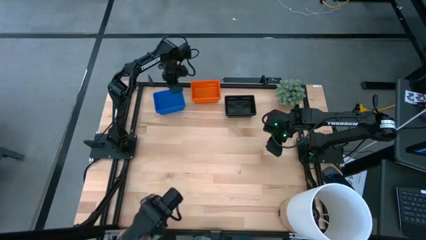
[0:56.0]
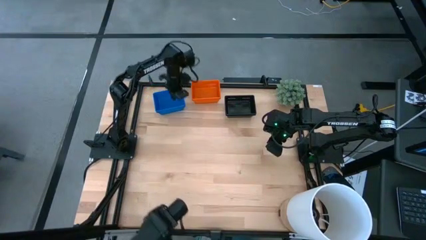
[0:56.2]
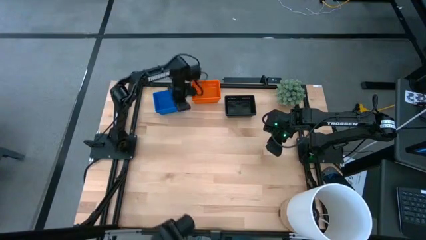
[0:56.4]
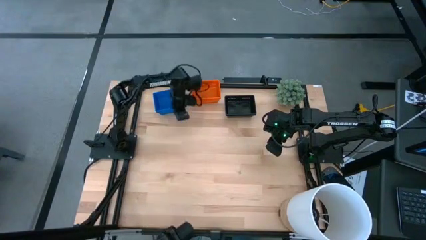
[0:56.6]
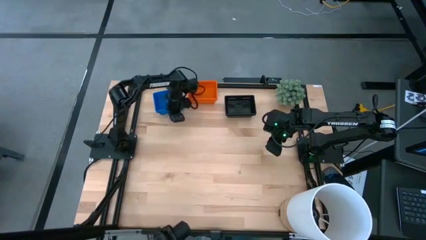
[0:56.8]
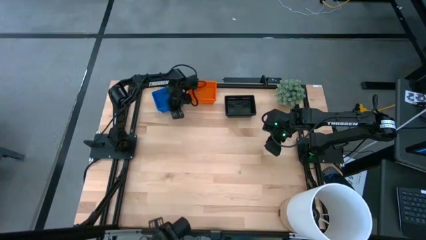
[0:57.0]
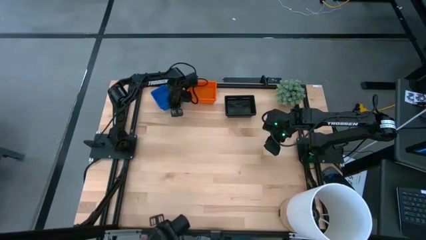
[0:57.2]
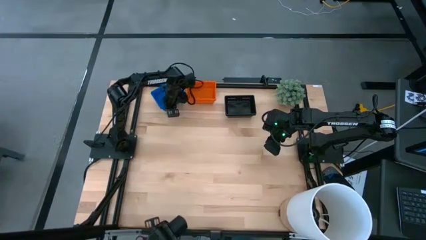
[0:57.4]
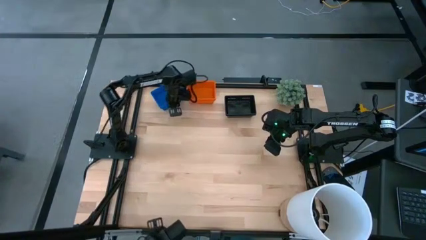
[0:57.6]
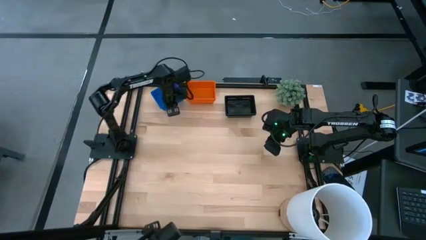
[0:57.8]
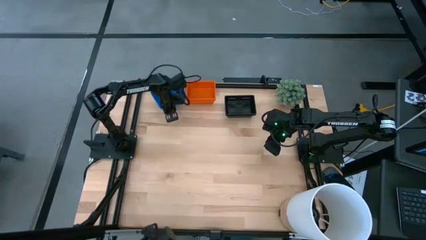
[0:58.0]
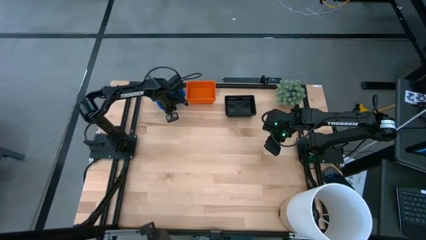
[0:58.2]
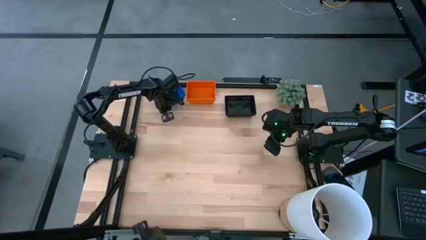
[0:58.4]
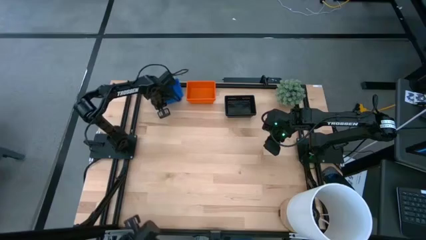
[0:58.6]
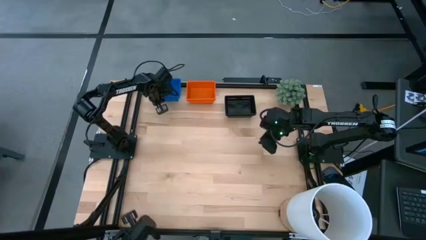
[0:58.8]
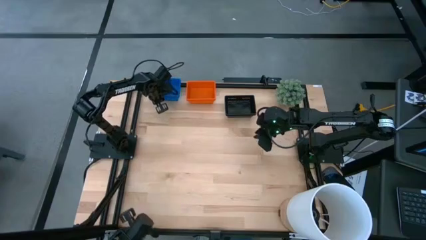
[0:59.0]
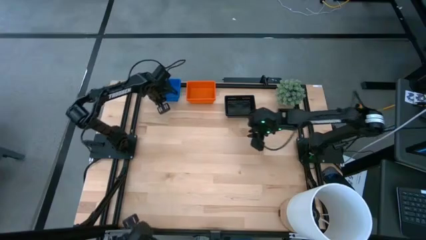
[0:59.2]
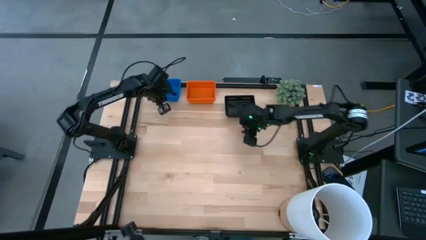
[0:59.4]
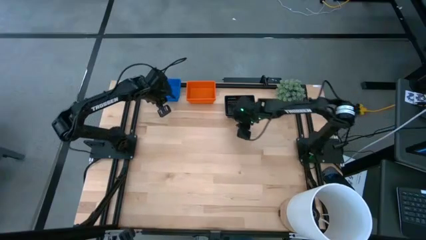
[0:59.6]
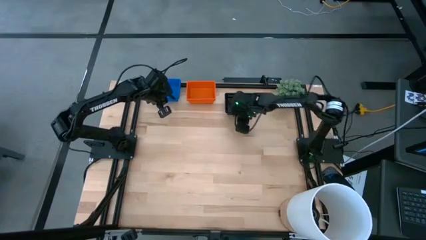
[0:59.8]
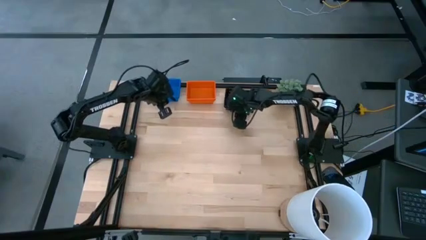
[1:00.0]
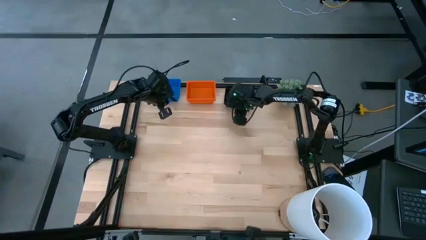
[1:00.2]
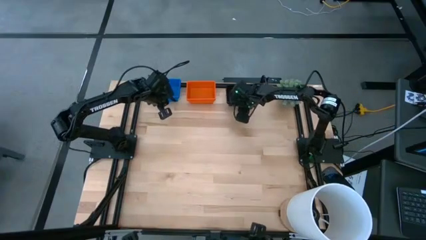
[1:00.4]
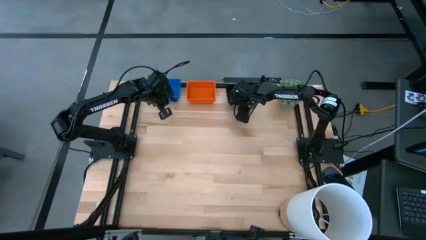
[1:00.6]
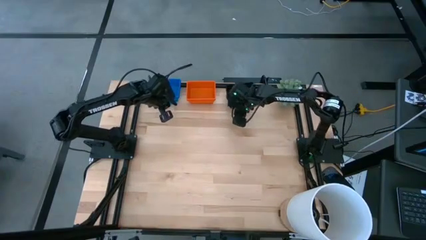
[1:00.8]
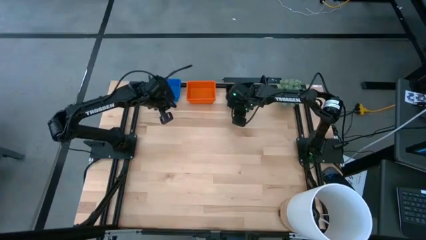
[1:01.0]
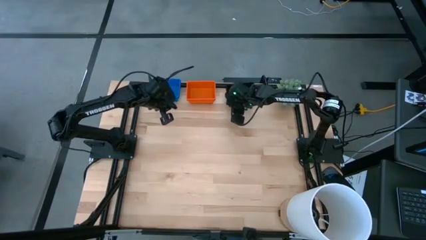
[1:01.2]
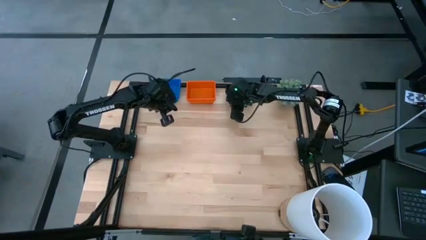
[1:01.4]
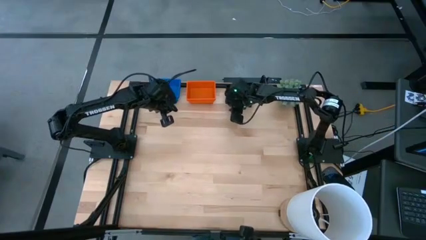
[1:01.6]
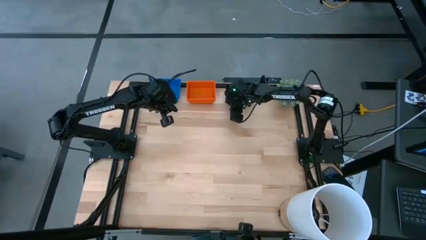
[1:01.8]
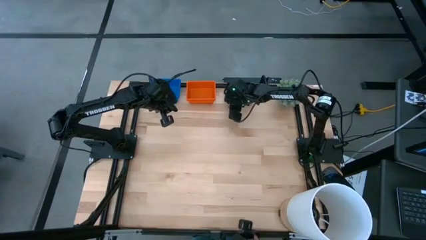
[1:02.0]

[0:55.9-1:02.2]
Adjust the stack of bins

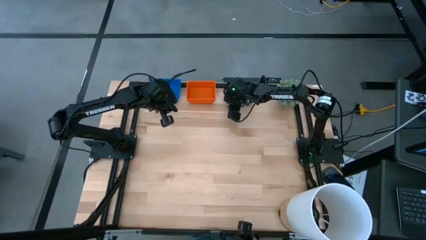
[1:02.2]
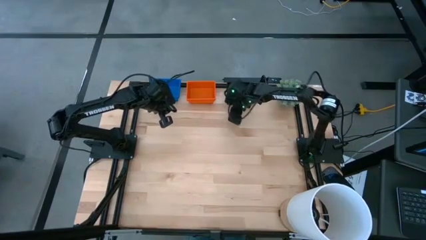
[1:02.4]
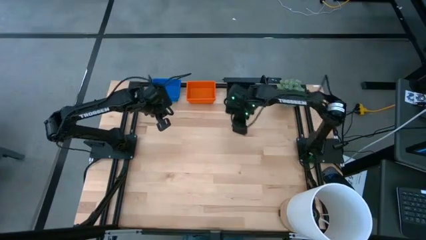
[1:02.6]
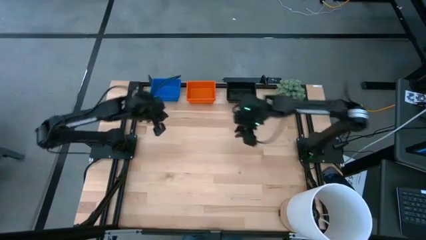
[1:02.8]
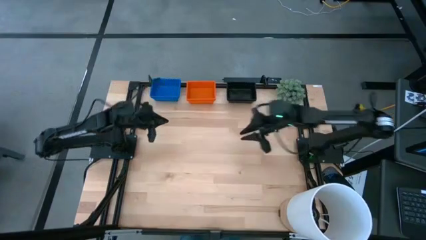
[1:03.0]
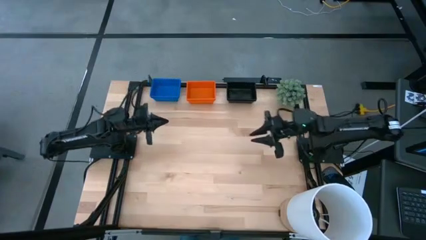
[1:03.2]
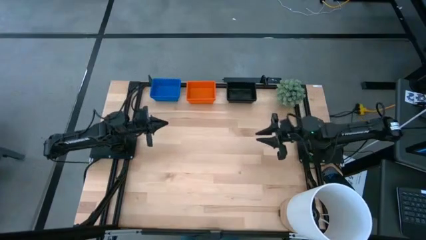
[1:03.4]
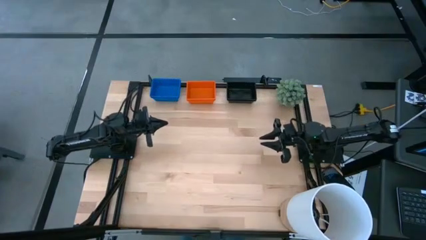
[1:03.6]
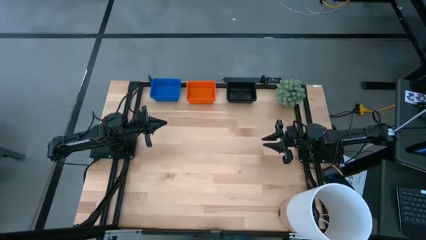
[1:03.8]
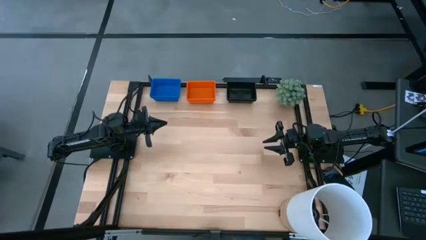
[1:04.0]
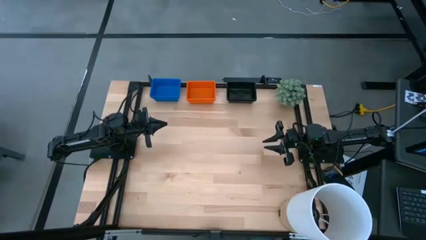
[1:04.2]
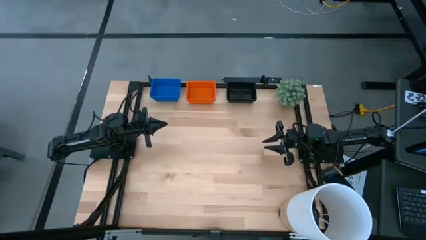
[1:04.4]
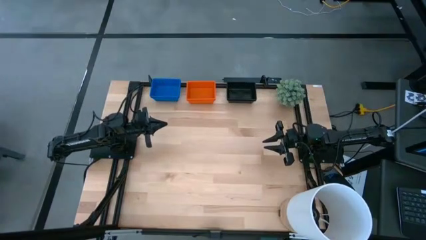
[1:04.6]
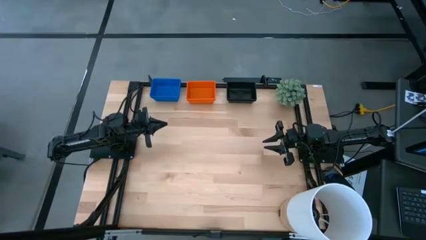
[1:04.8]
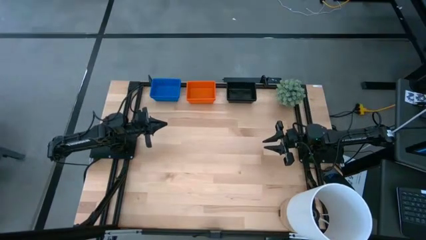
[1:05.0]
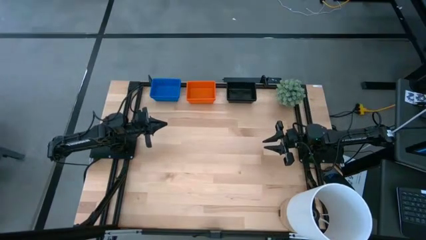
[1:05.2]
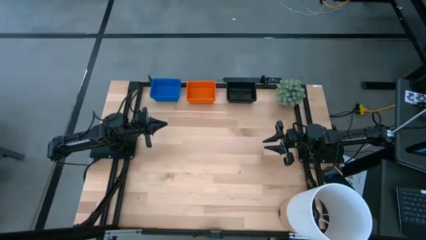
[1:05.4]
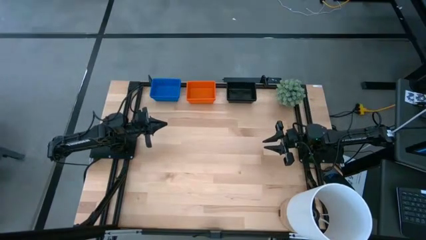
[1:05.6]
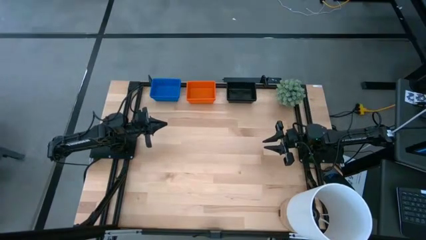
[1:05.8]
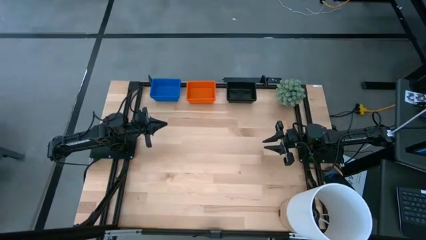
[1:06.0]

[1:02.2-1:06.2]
Return to Home Position
